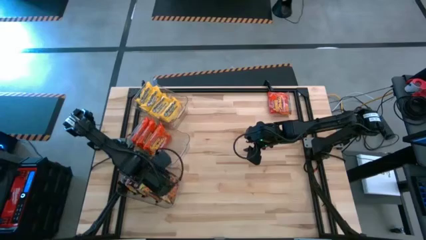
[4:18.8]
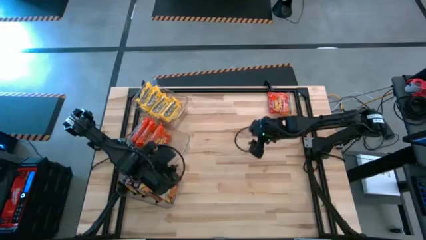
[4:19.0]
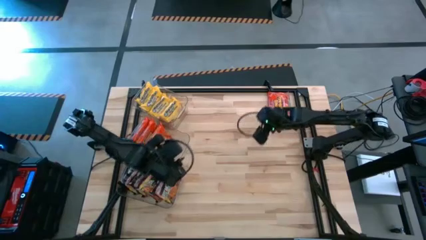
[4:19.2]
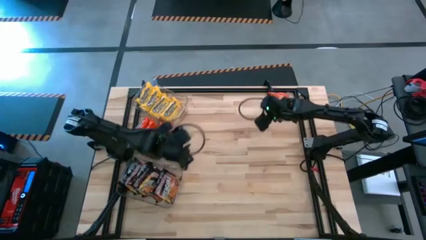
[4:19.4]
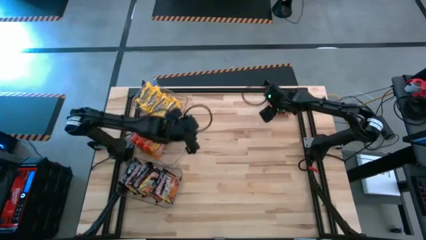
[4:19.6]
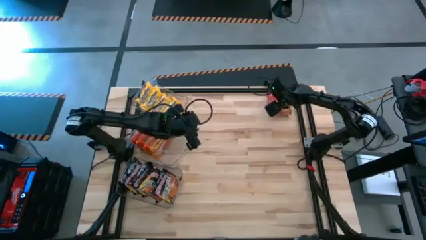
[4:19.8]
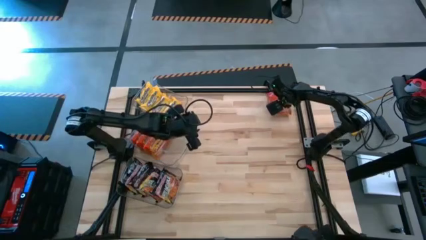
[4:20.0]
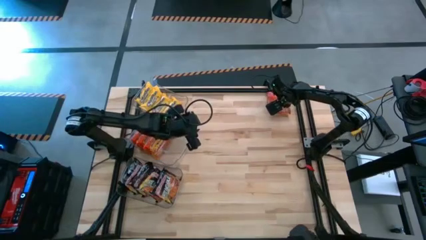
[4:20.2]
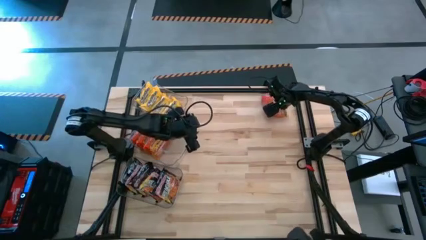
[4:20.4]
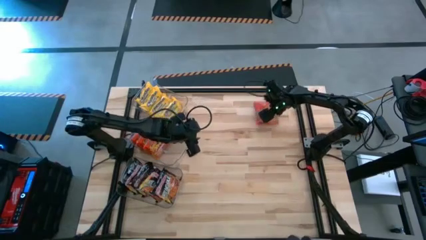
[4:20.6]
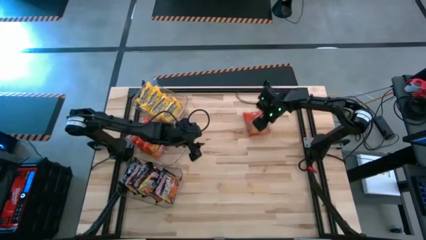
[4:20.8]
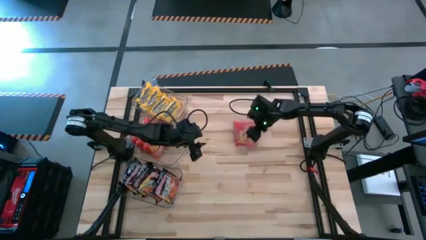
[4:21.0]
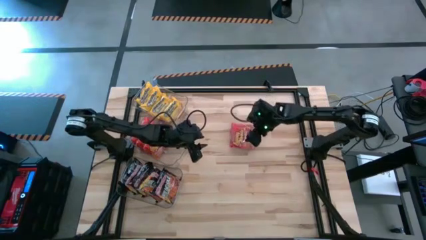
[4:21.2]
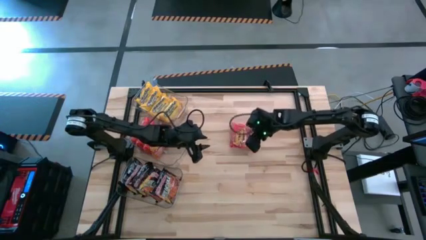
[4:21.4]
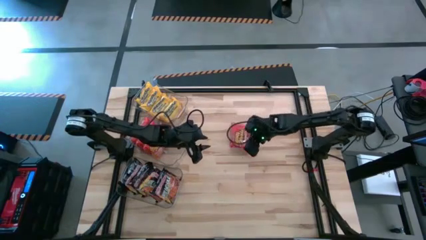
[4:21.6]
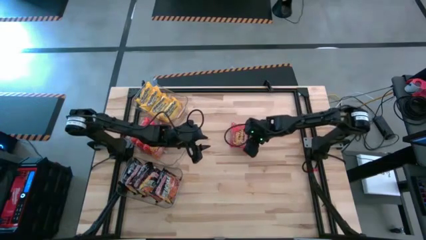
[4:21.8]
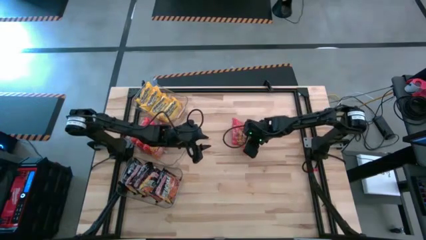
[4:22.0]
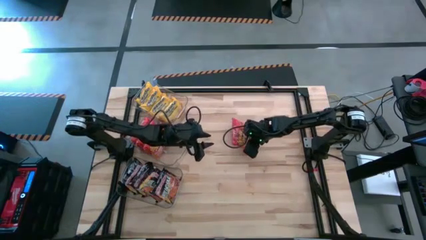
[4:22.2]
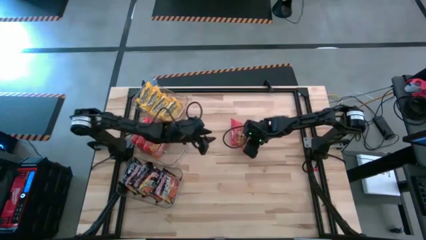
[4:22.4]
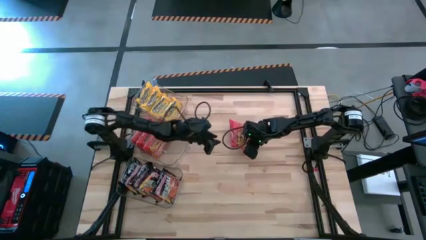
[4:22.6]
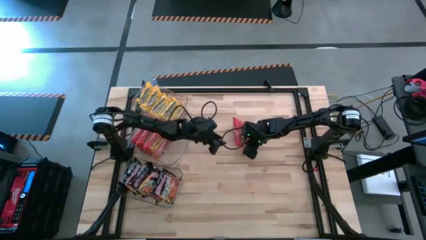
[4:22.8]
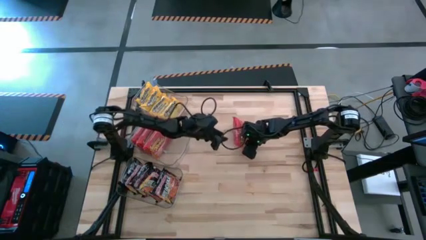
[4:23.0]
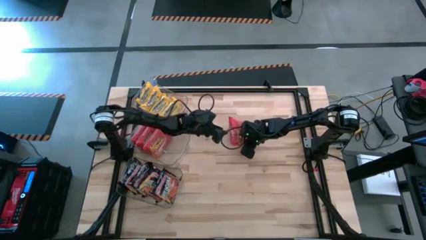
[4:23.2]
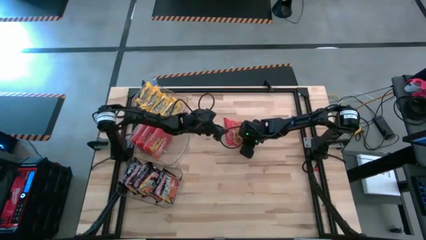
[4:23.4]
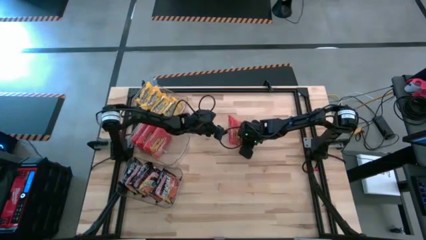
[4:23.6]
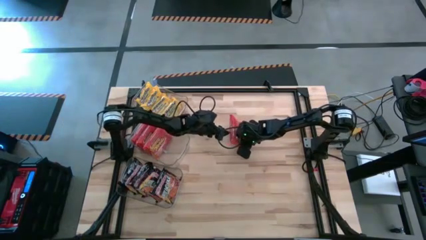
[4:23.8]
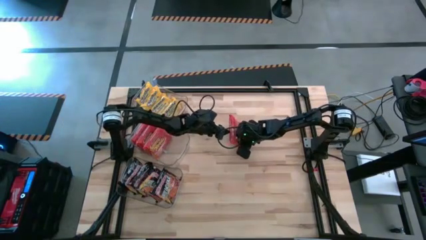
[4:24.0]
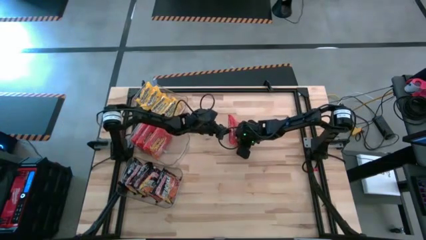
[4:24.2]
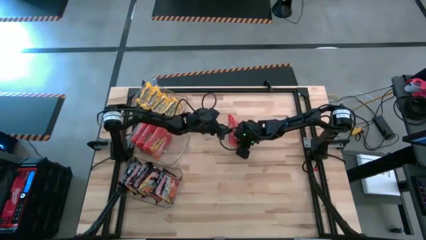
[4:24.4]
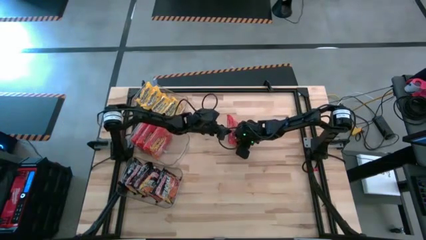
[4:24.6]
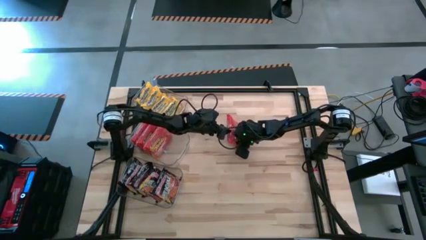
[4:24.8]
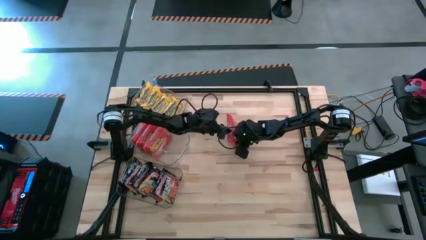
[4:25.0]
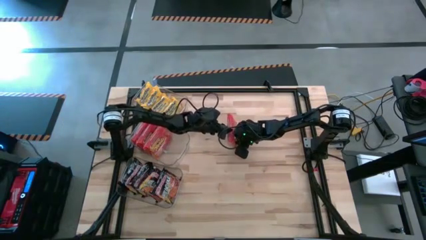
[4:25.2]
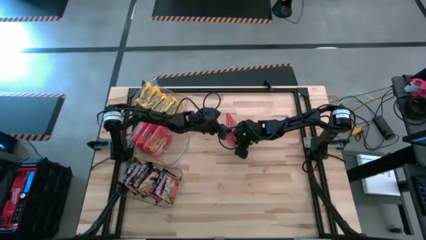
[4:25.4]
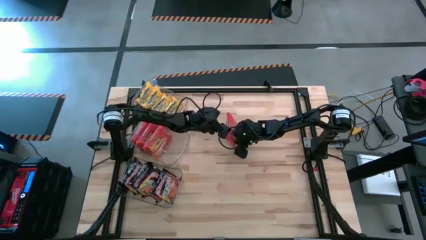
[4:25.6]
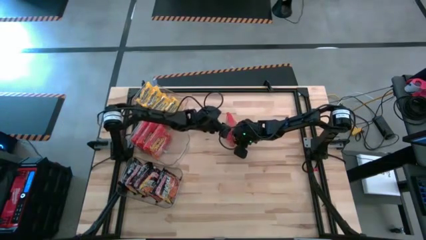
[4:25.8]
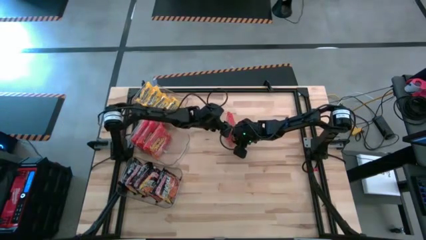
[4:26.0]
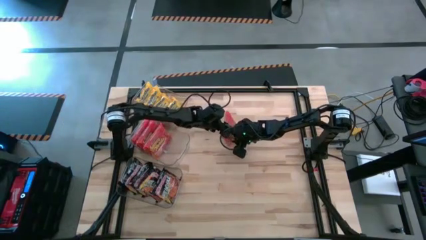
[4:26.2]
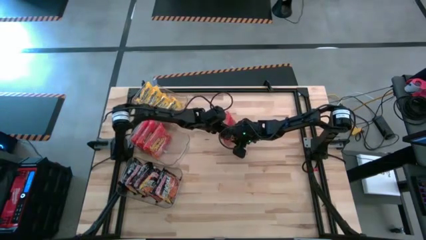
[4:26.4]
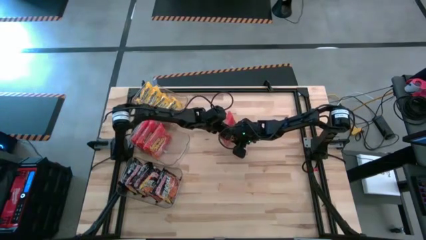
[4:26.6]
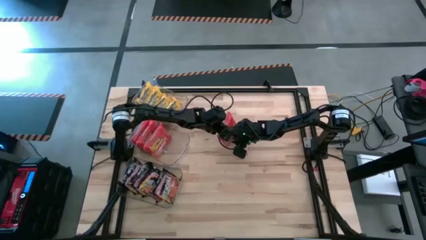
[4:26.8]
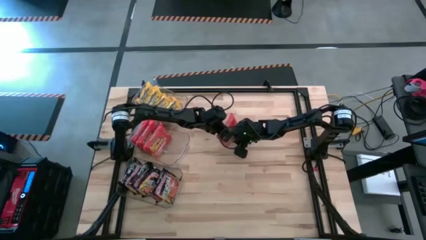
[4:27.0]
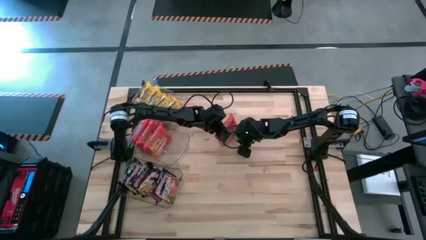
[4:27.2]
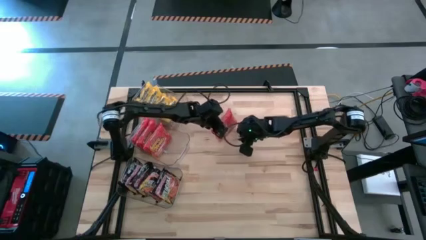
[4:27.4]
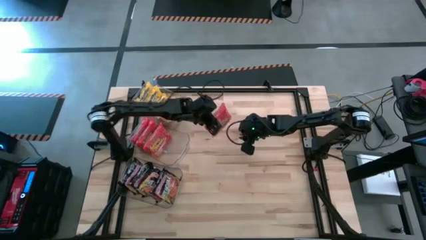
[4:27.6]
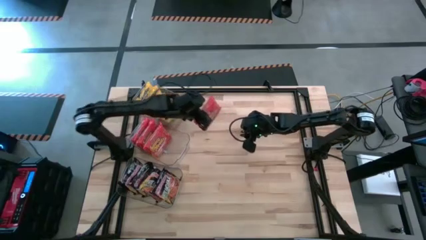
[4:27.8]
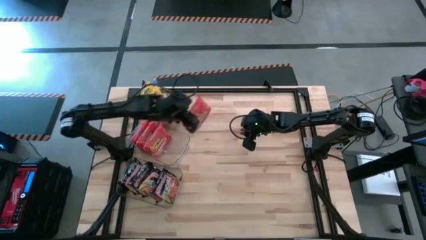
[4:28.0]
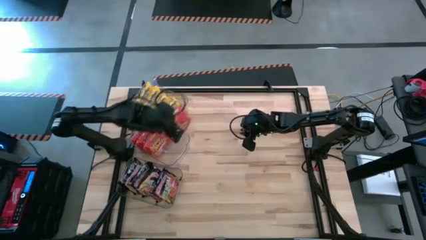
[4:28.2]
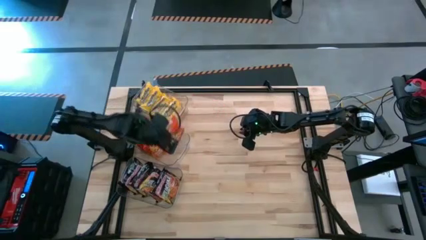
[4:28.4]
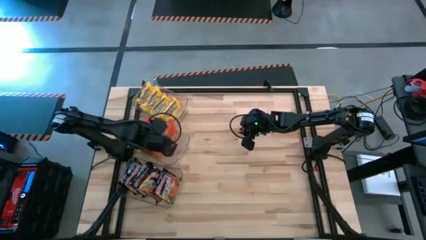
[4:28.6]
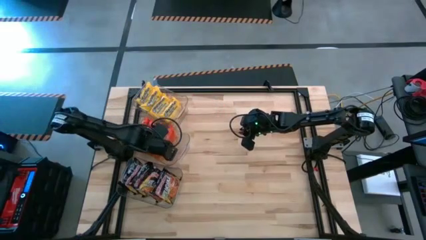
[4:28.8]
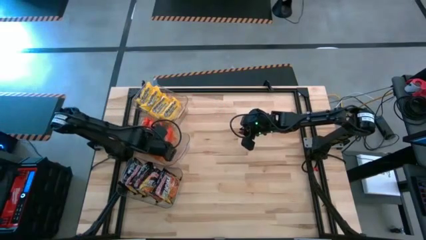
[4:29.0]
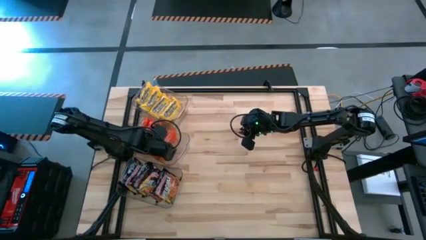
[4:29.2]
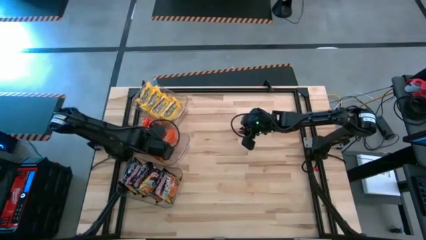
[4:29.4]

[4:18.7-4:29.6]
Task: Sort Maruchan noodles
Put the orange noodles pack into the middle transparent bin
